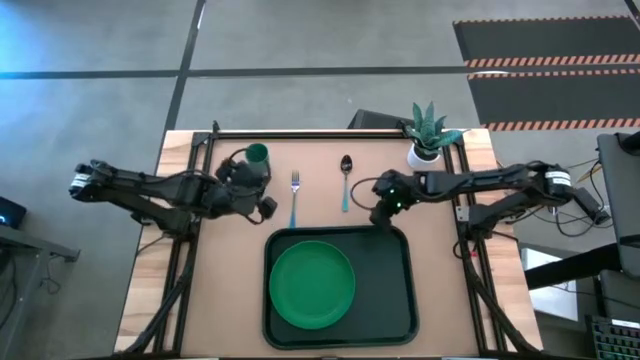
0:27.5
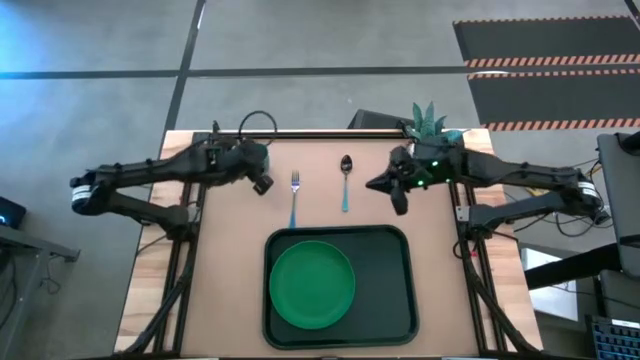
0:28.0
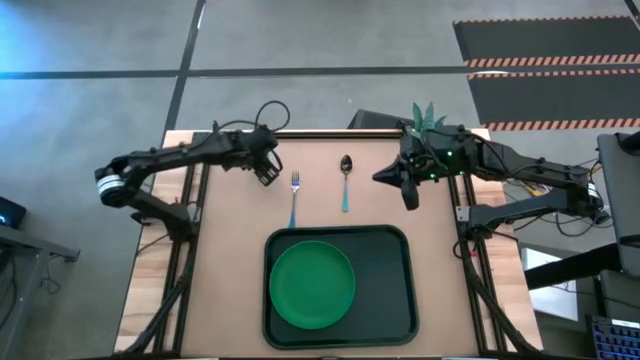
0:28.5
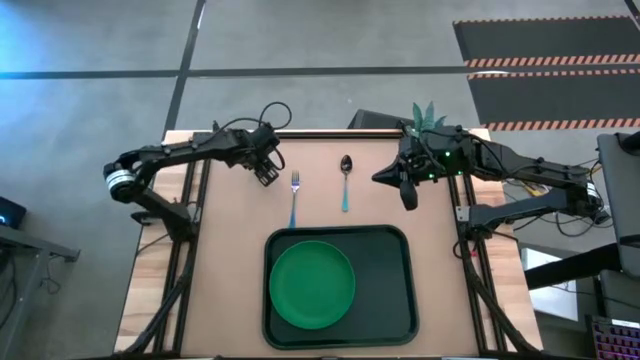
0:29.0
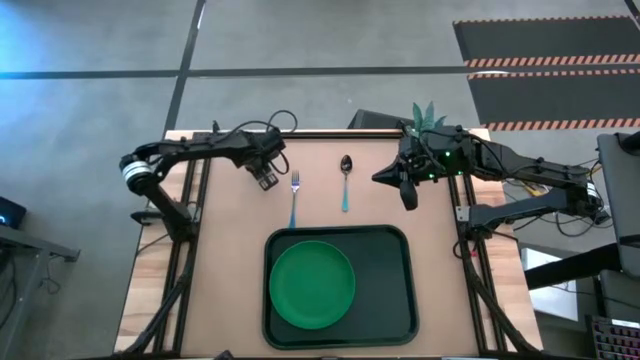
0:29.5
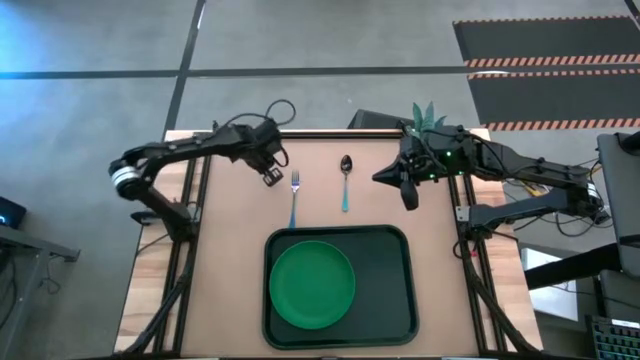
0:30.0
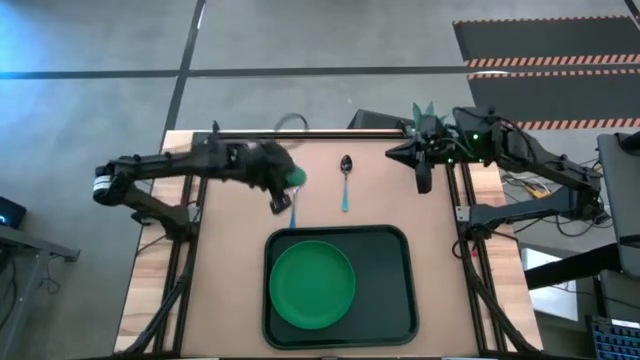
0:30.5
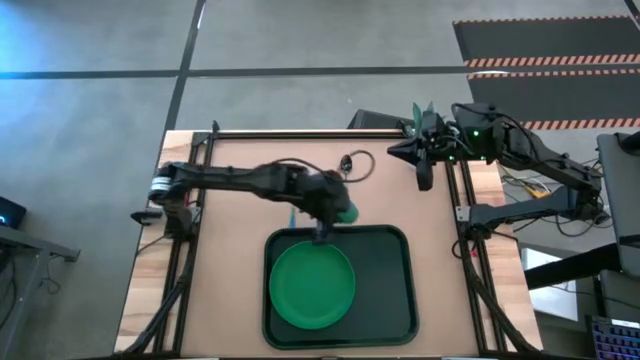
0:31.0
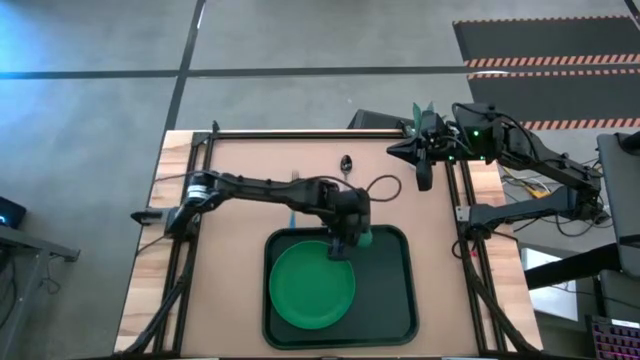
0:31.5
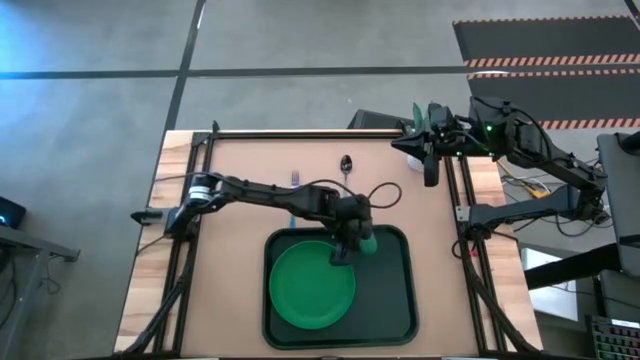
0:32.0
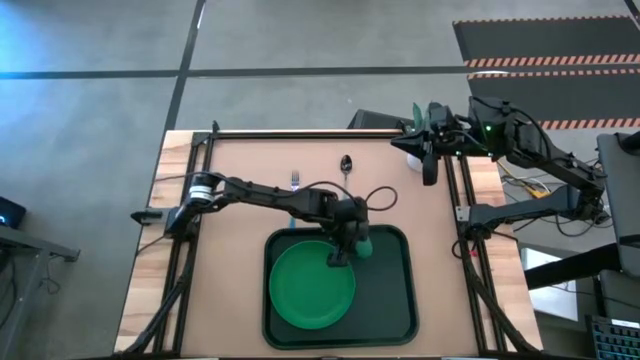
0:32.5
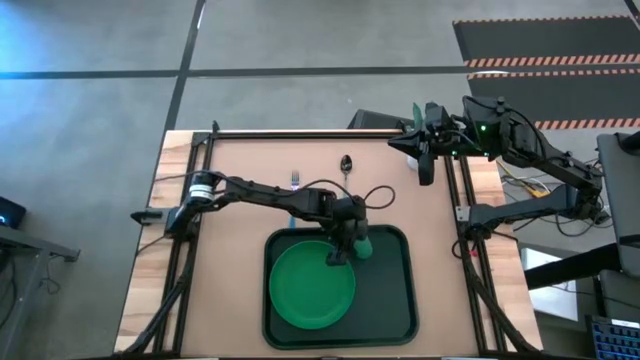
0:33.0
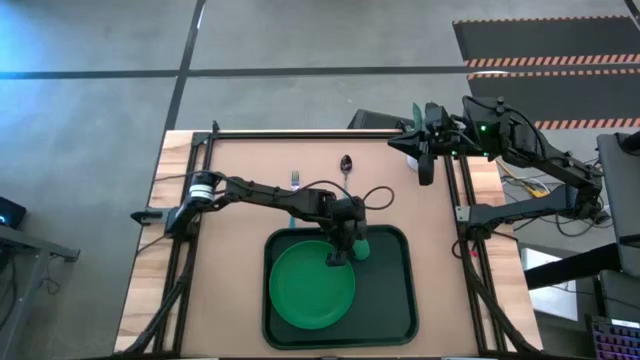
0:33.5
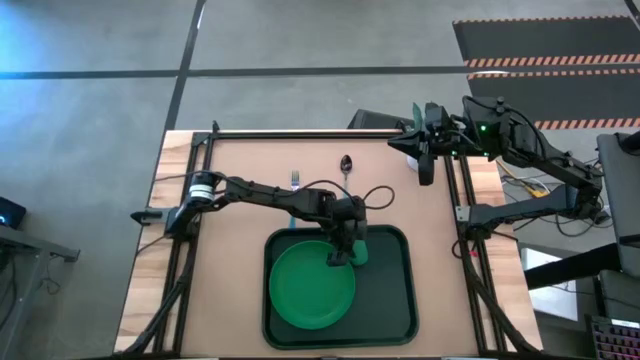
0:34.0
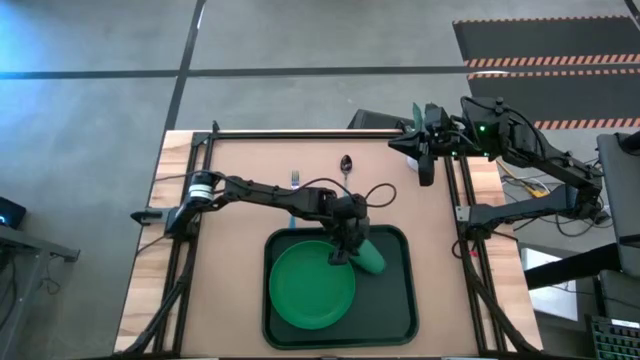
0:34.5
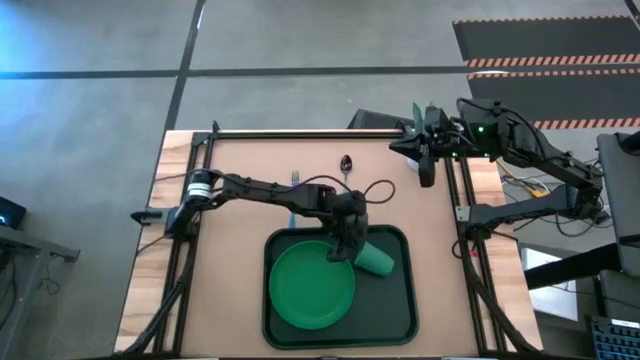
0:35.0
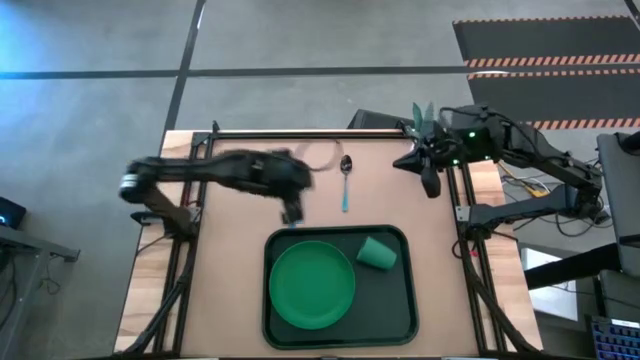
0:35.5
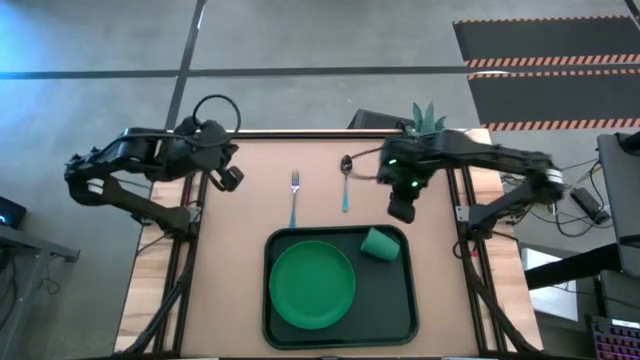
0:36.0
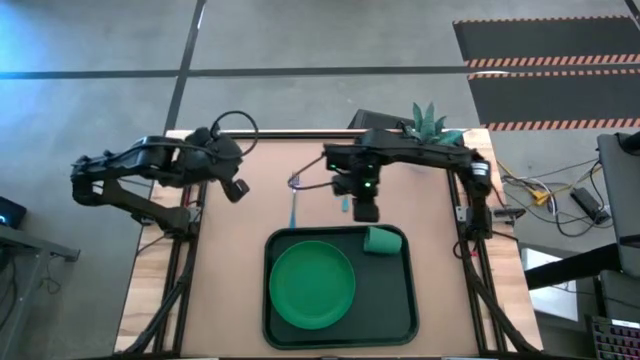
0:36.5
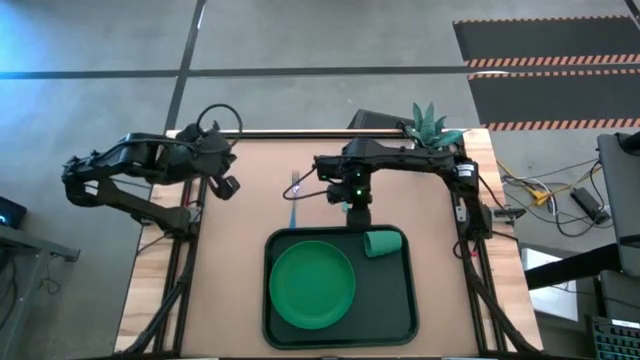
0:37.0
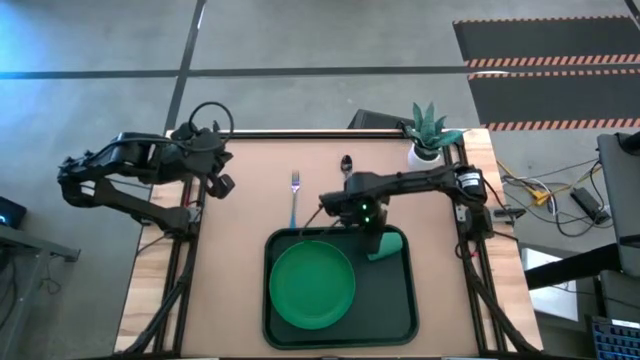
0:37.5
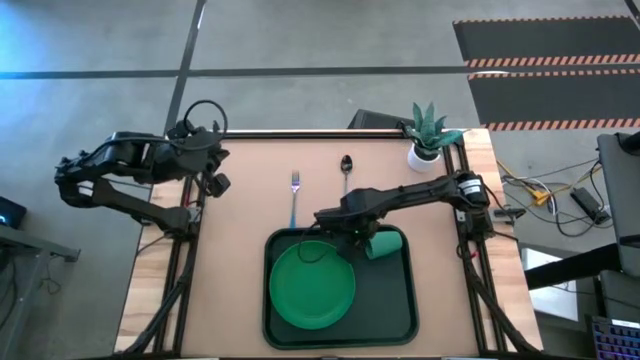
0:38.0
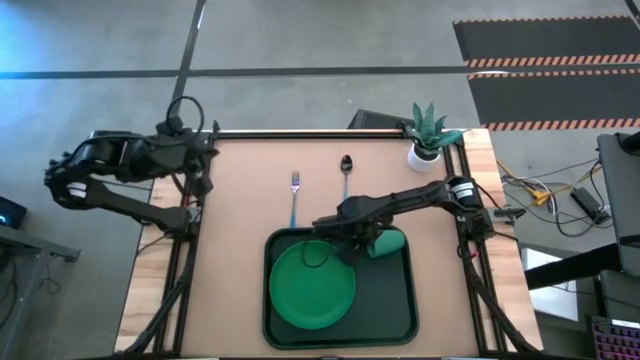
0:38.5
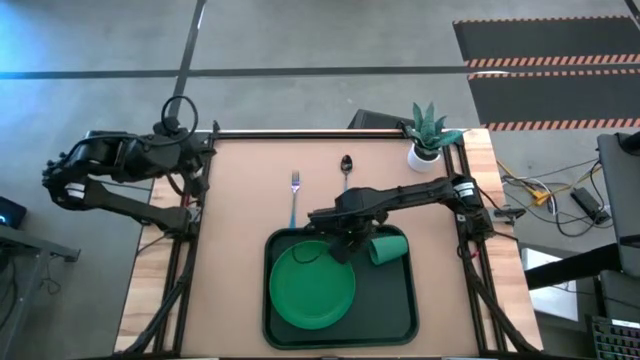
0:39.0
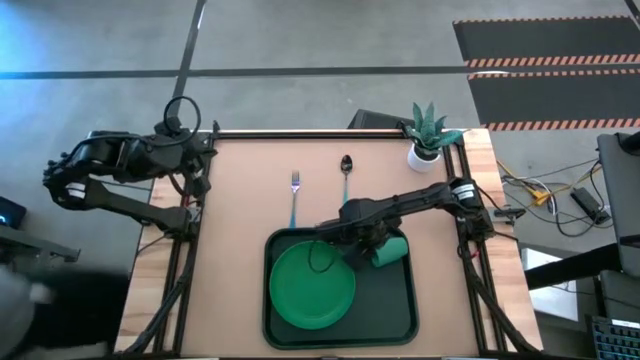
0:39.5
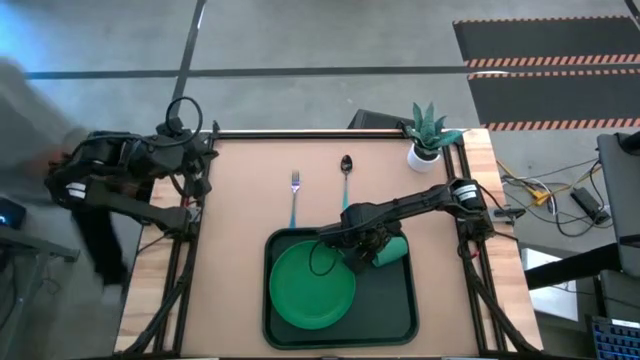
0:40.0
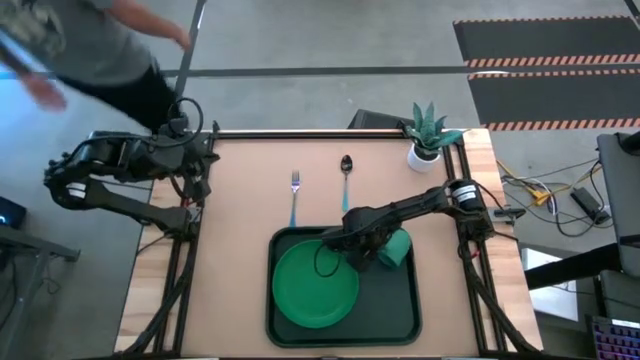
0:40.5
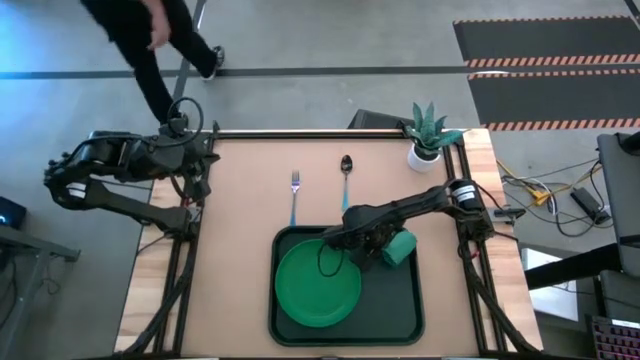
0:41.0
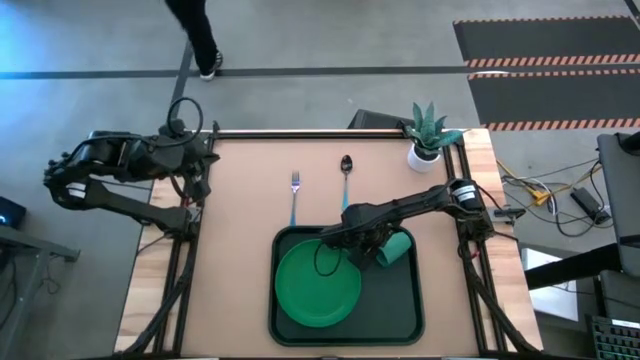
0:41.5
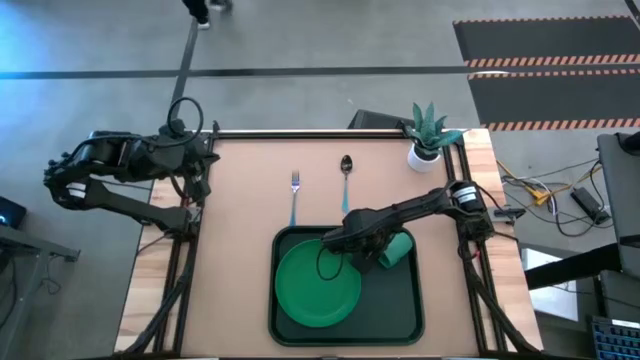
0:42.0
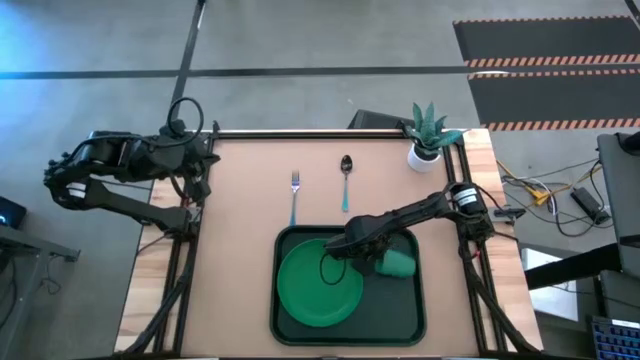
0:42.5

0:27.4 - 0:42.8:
Task: Pick and place plate/cup/fork/spoon on tray
Put the green cup on the green tray to the top left of the green plate

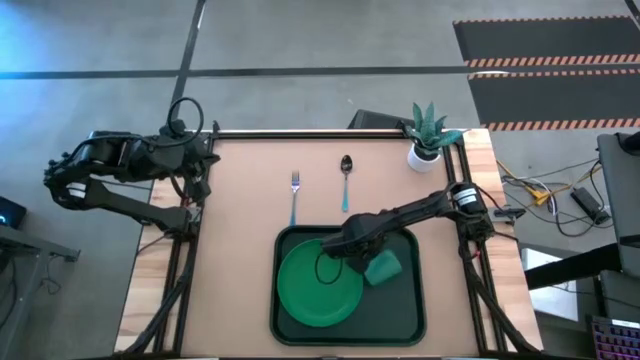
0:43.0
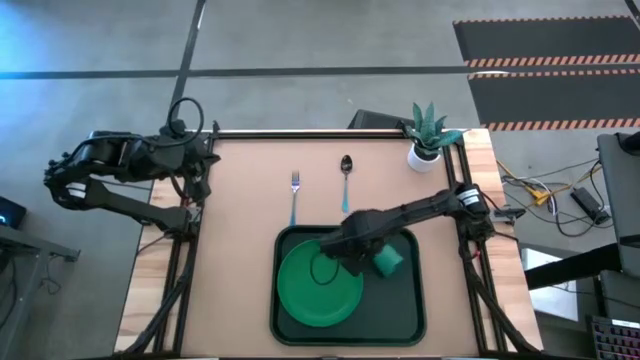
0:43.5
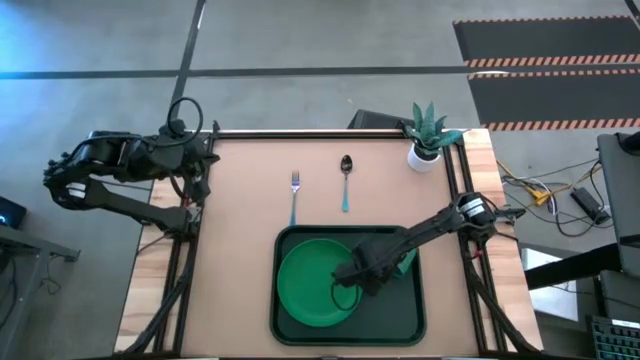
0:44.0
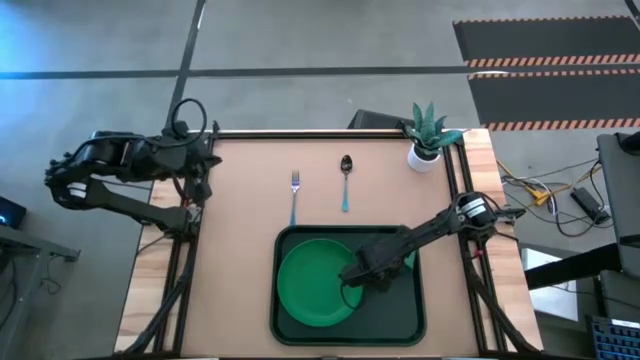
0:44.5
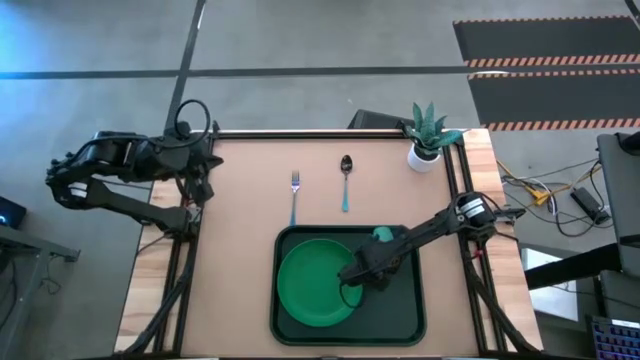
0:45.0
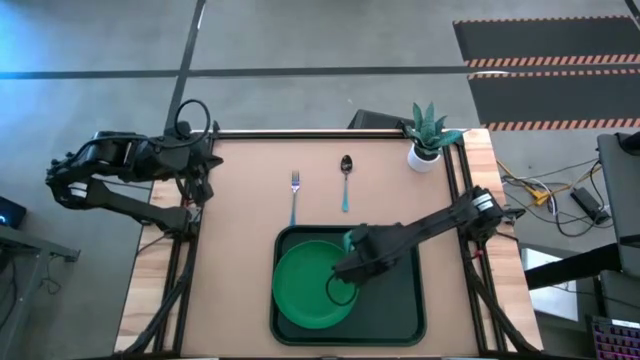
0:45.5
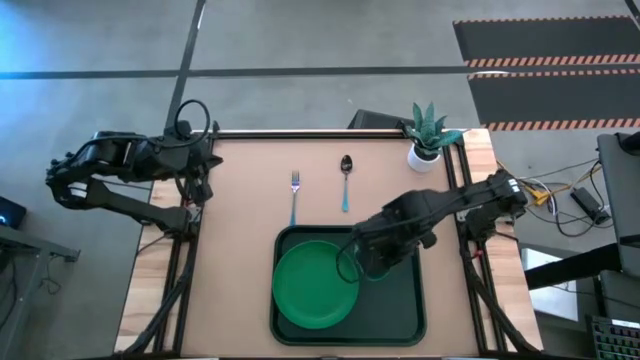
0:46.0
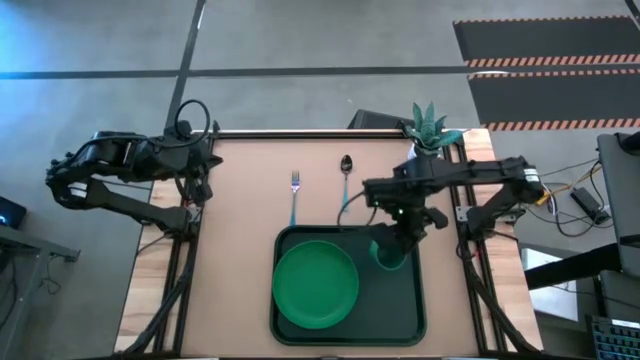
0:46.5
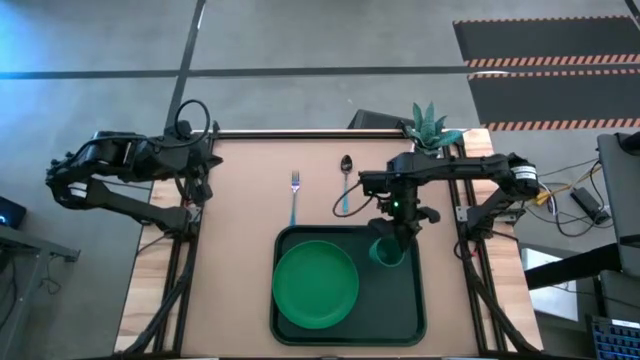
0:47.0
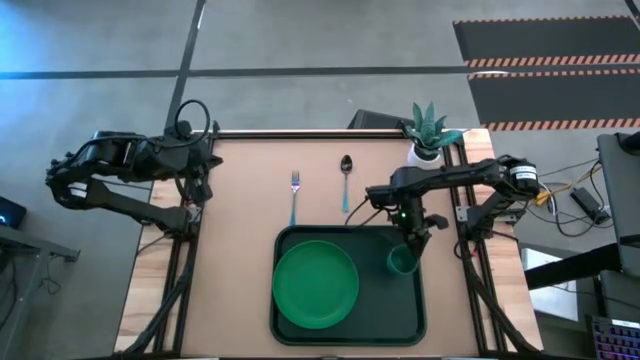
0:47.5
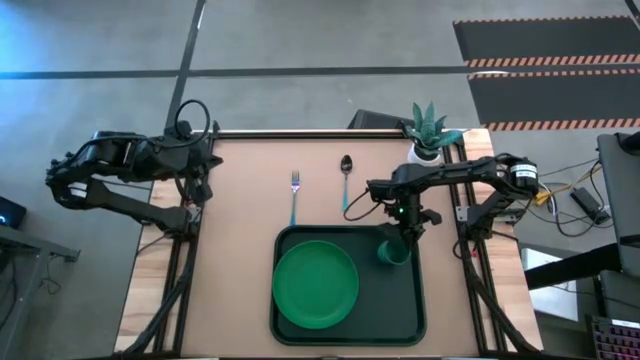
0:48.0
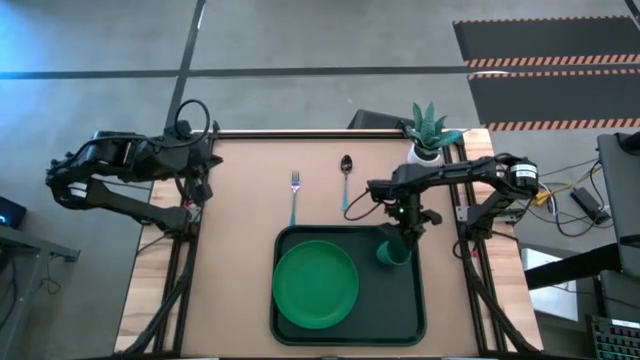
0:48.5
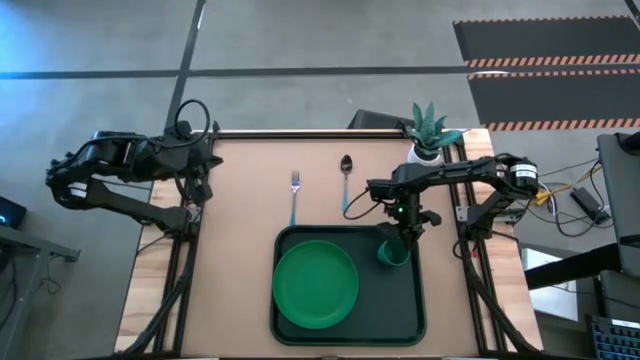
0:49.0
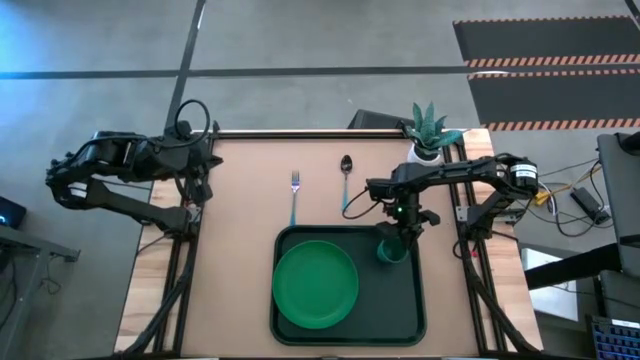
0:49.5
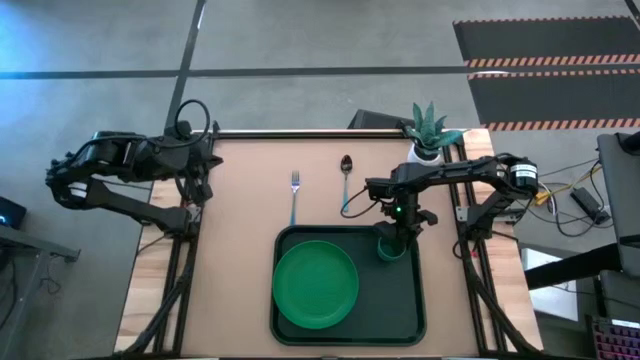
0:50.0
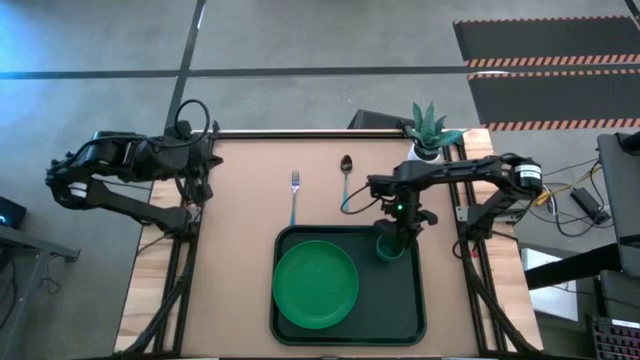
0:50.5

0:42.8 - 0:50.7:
Put the green cup on the green tray to the top left of the green plate
